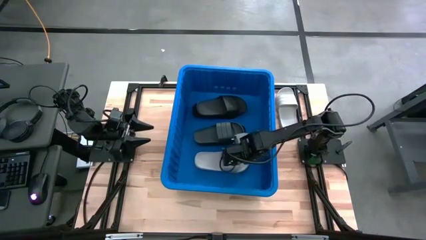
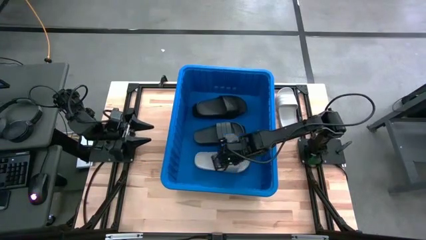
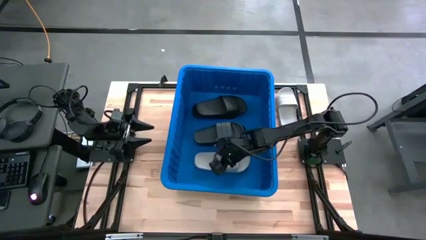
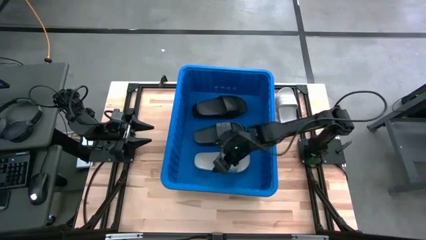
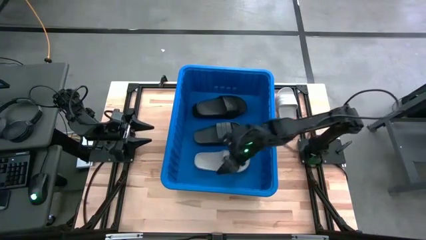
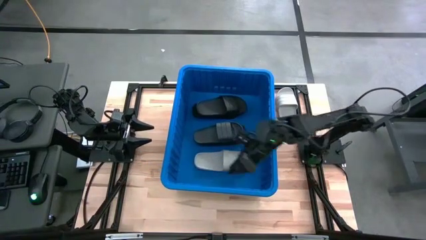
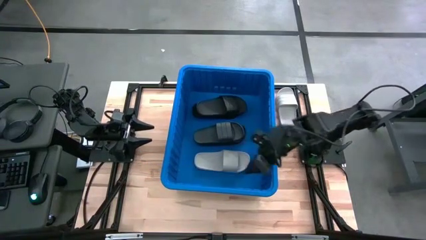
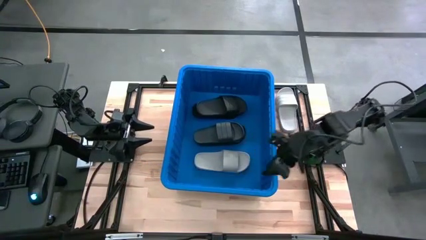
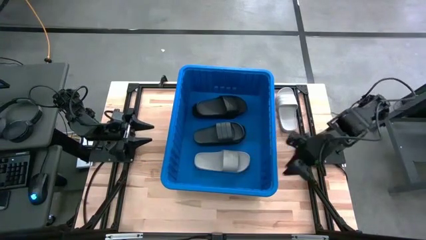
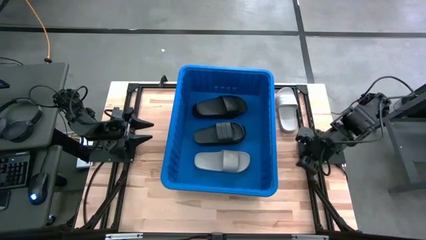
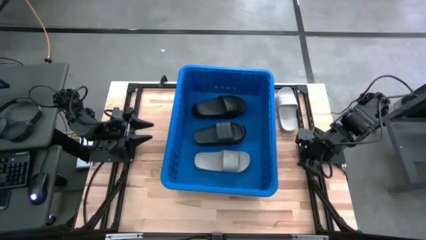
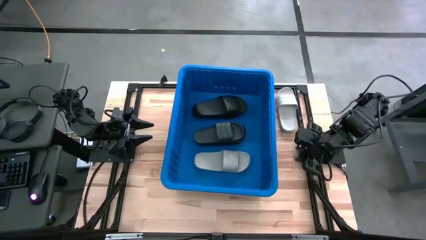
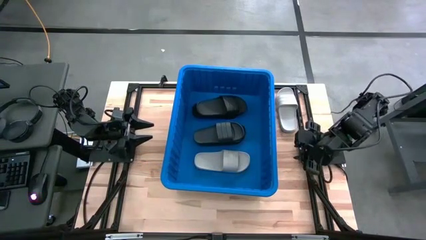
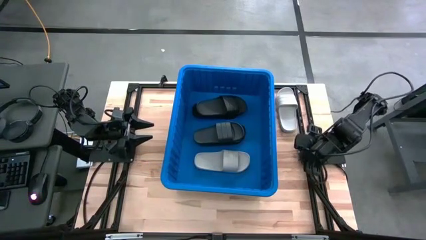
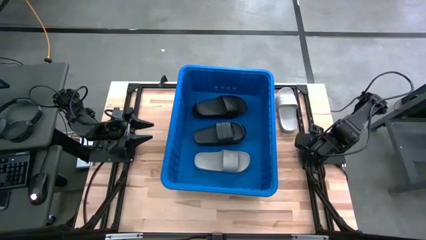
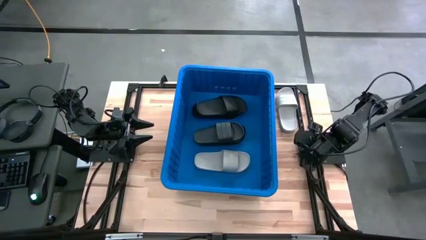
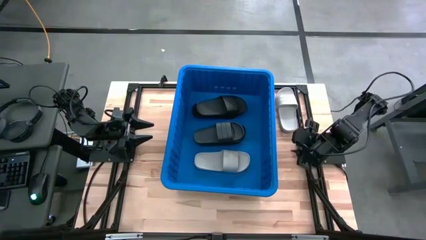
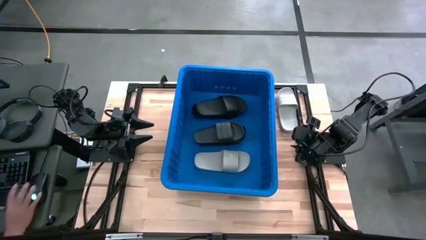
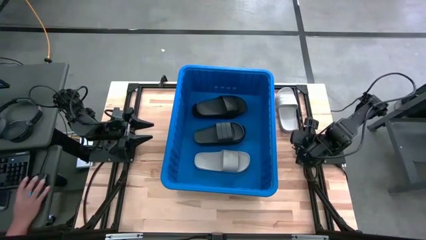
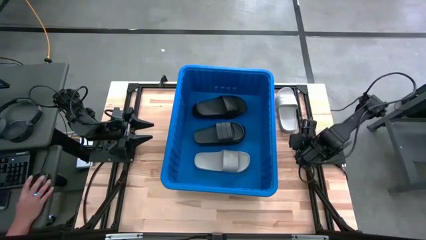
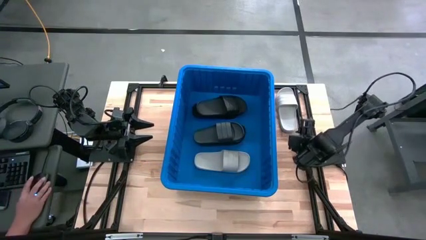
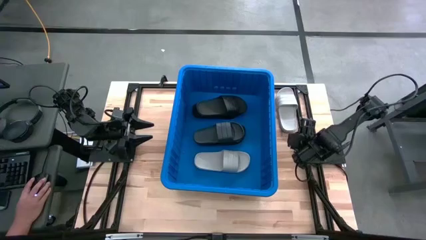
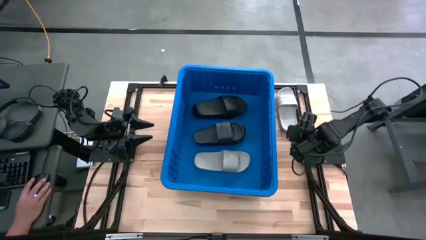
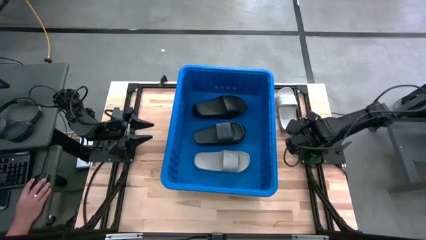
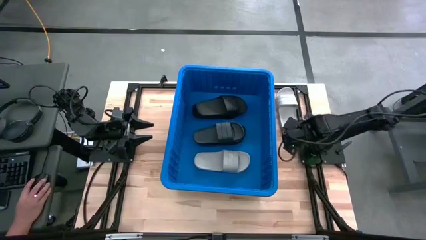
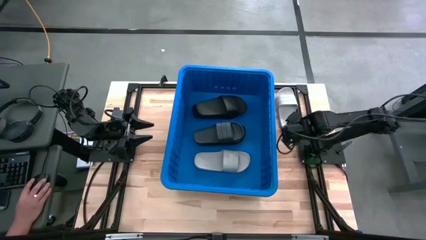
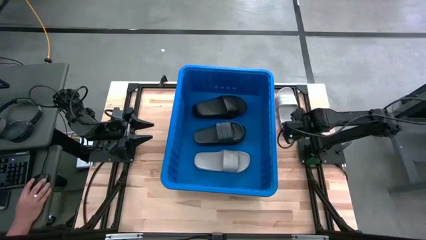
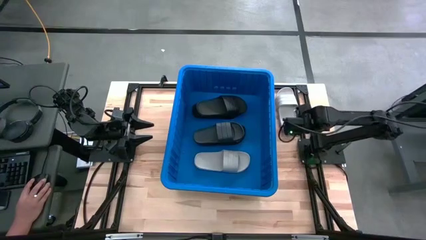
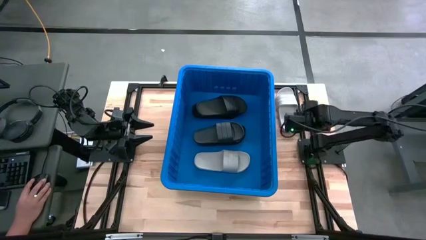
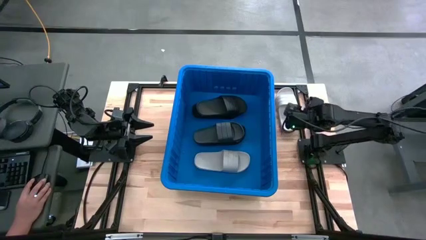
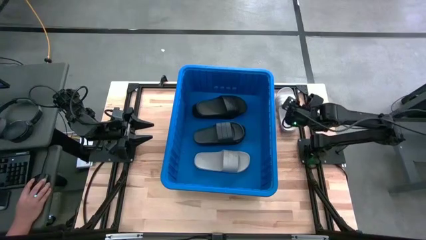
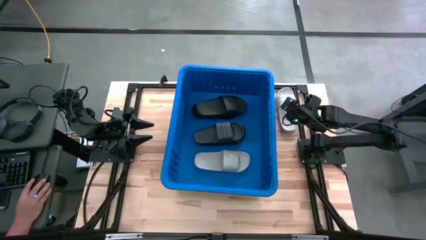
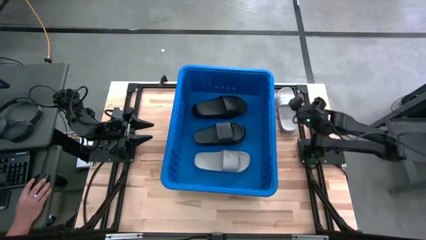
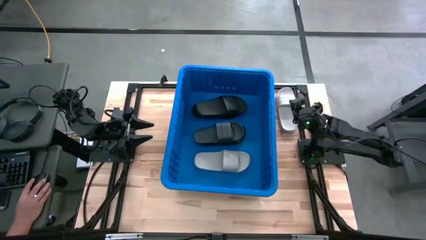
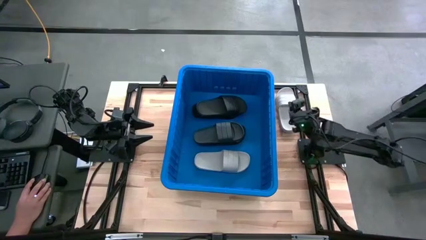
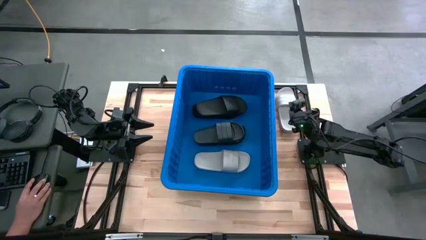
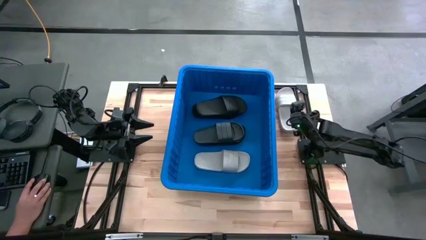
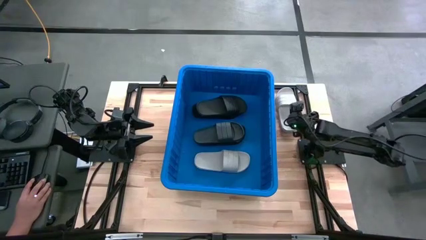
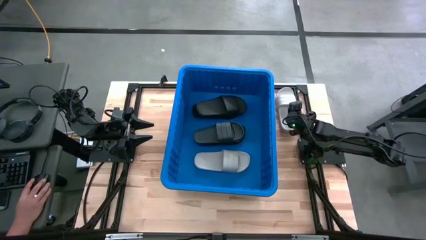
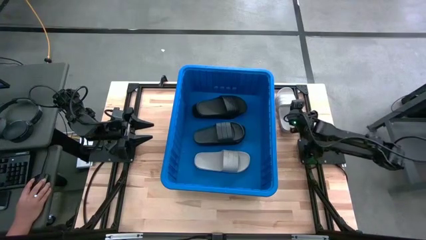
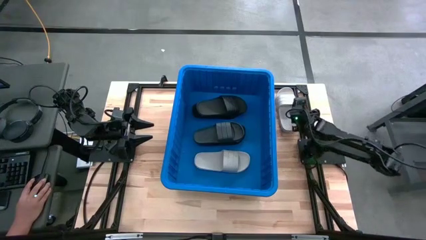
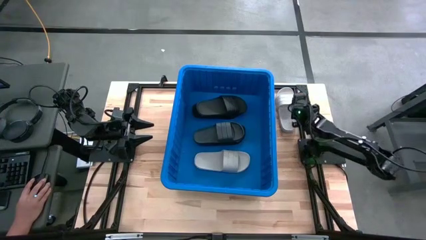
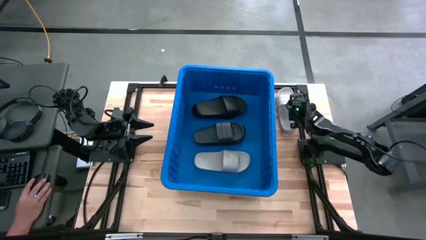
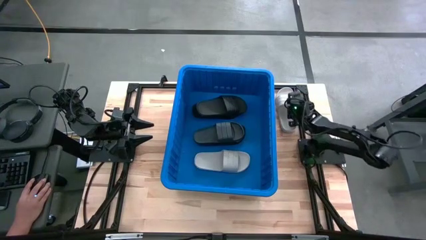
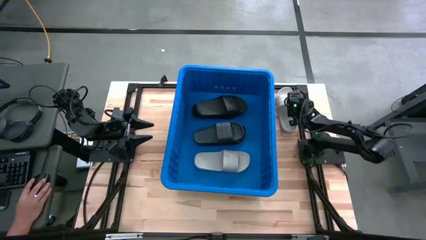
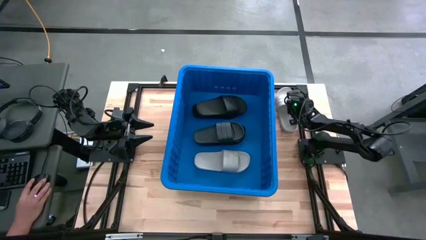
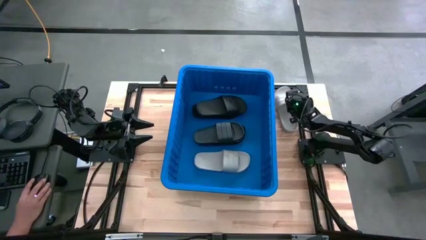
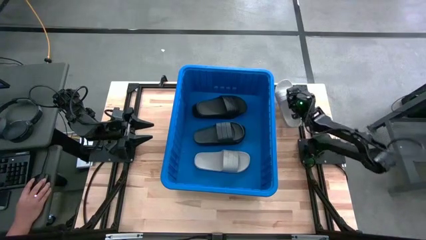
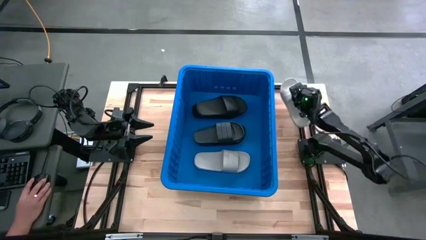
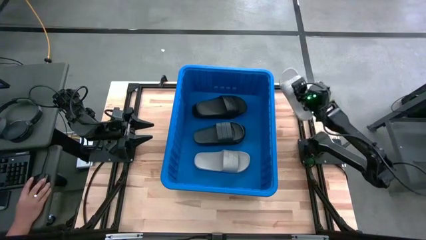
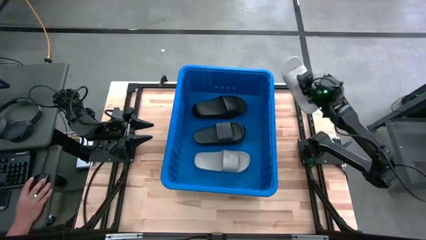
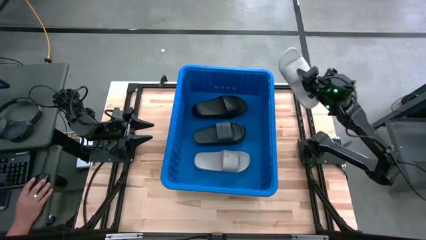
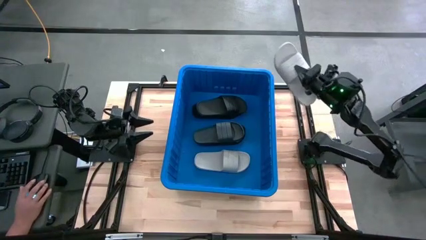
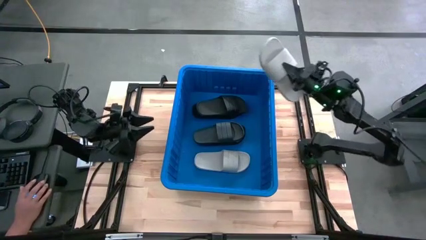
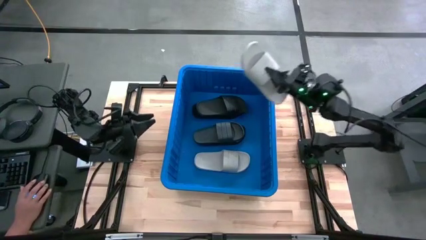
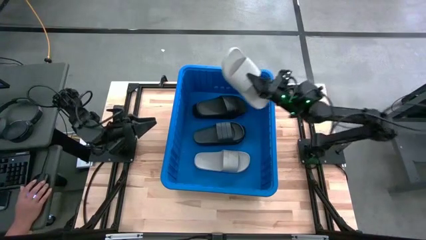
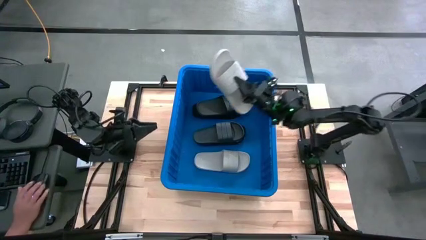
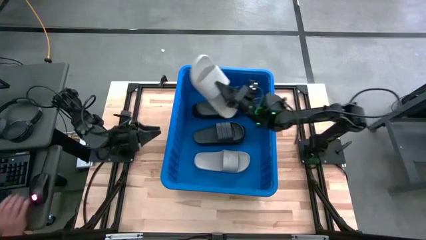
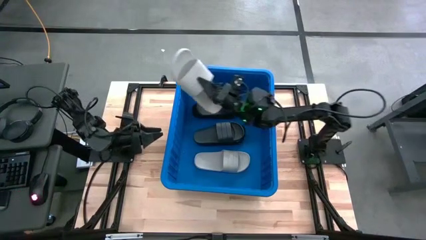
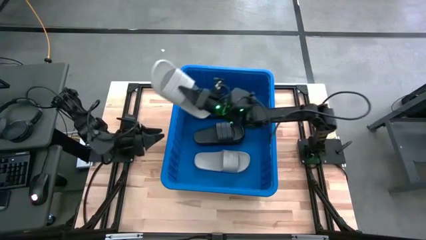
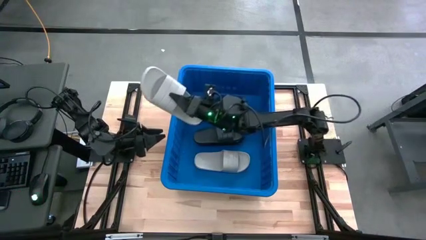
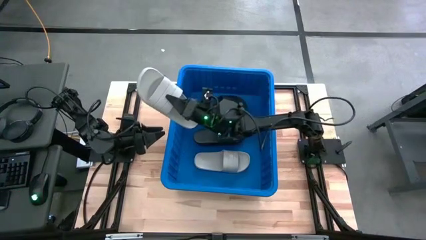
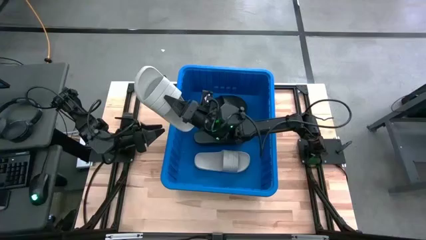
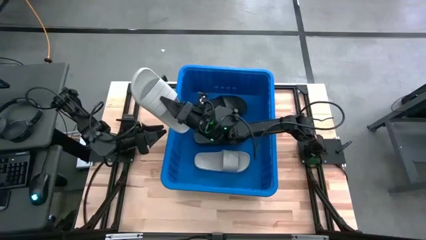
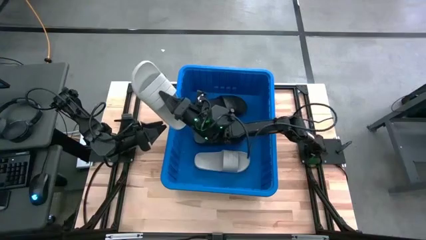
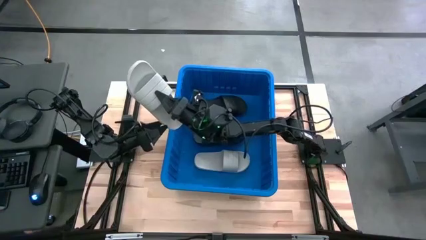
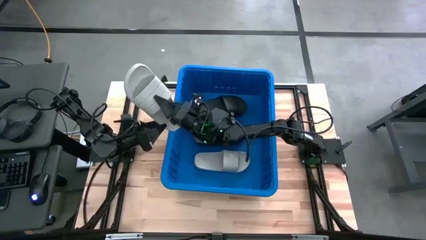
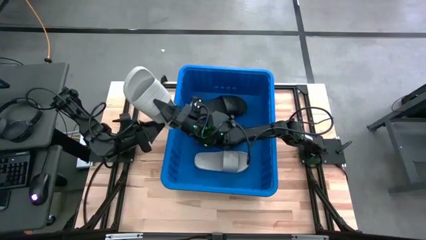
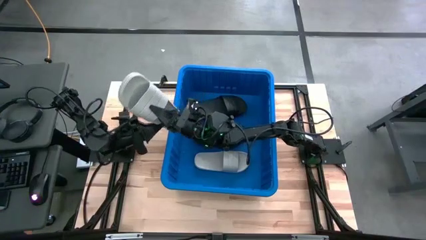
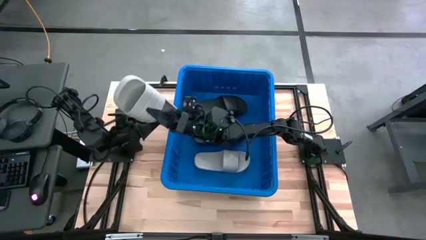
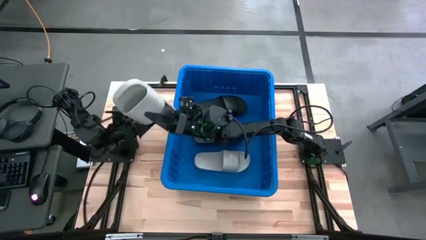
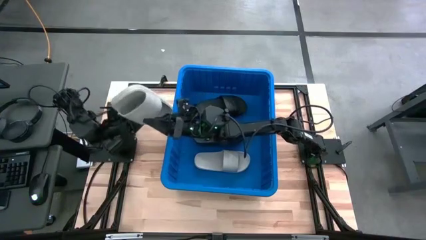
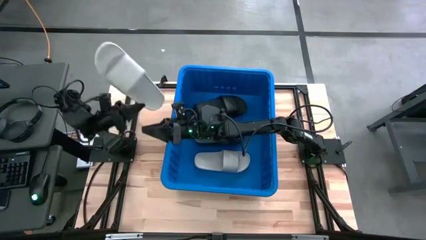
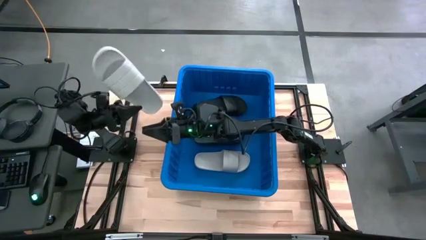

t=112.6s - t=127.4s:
Task: Pick and place slides into bin
Put the gray slide into the blue container

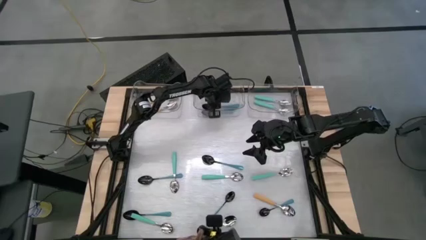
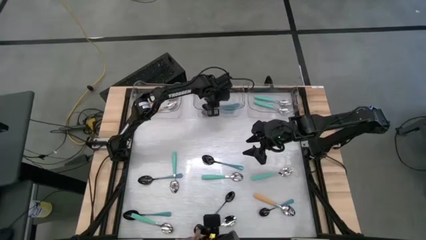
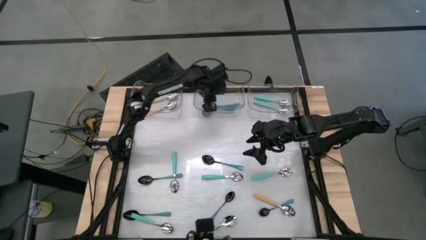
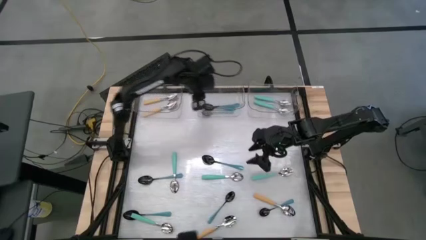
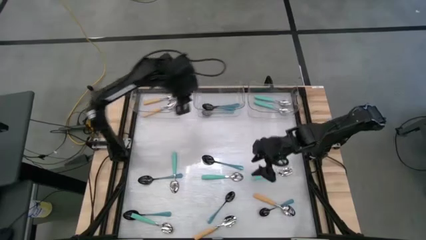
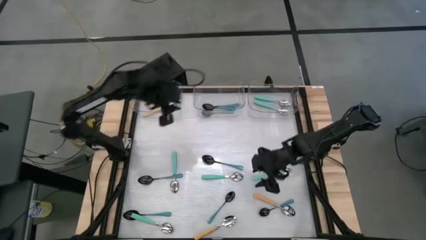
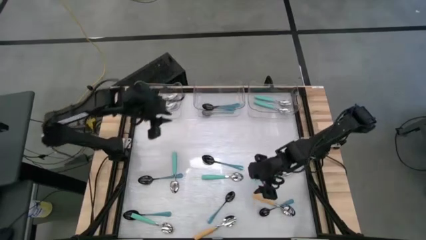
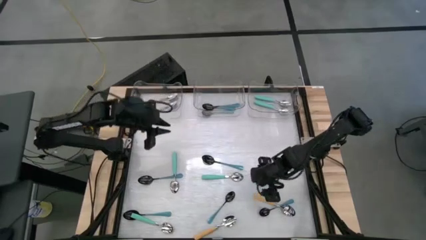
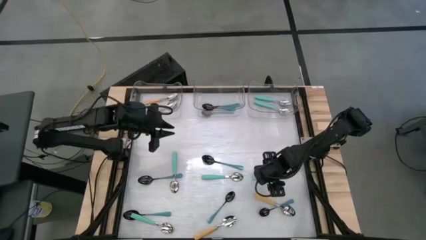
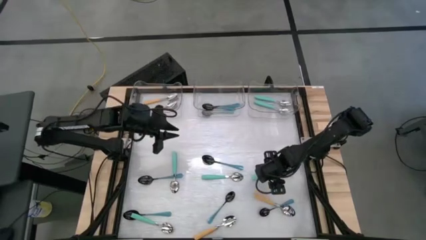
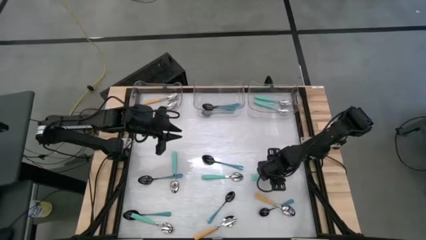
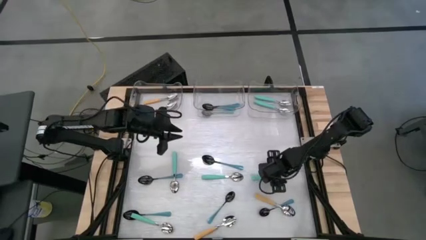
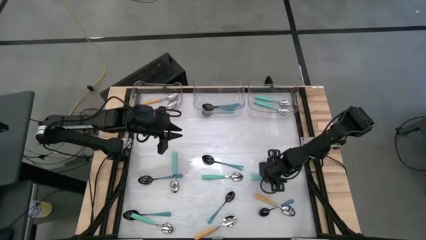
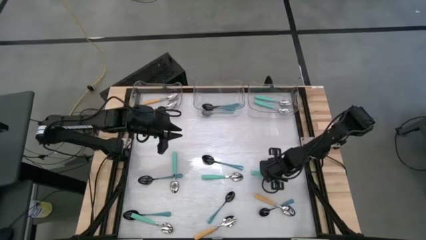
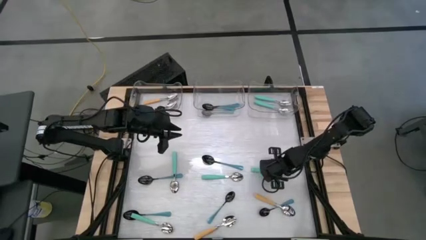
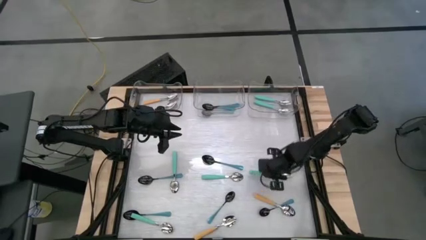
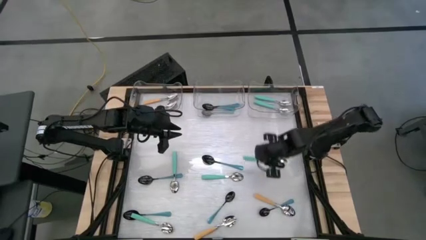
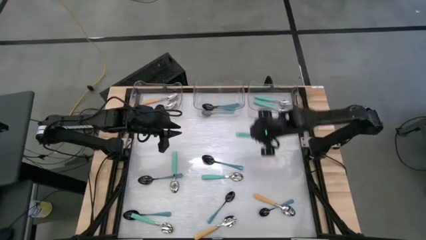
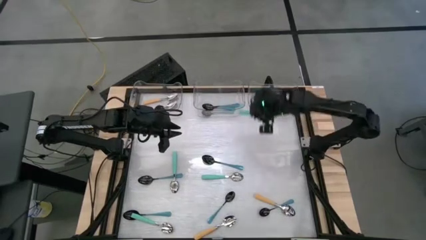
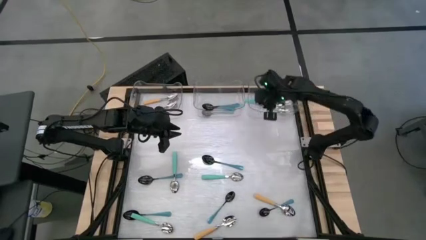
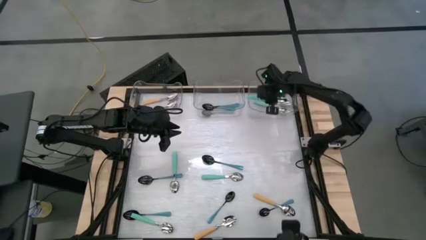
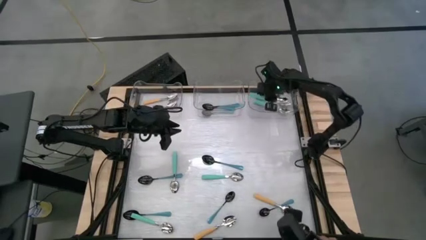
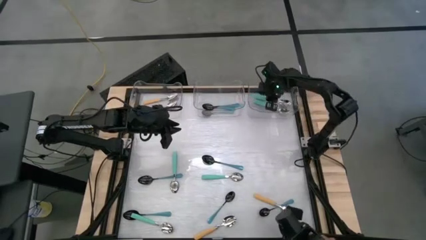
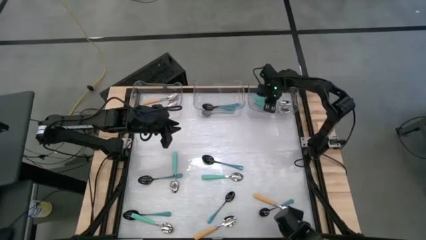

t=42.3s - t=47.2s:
Task: Sort silverware by color (type)
Put the light green spoon into the right transparent bin
